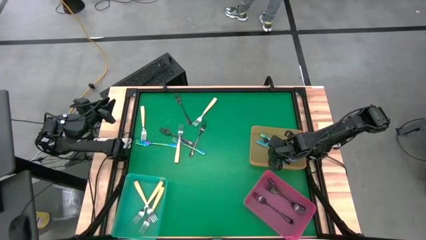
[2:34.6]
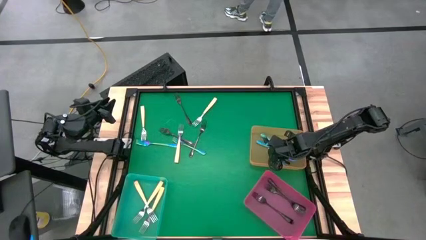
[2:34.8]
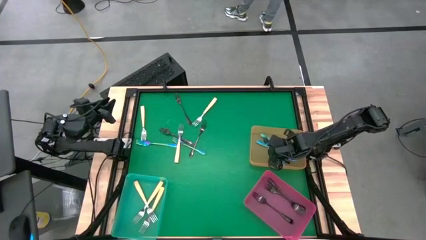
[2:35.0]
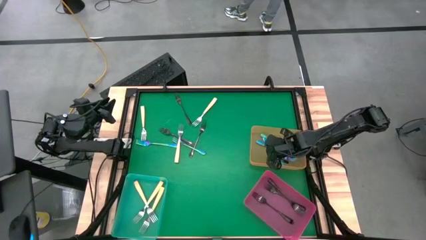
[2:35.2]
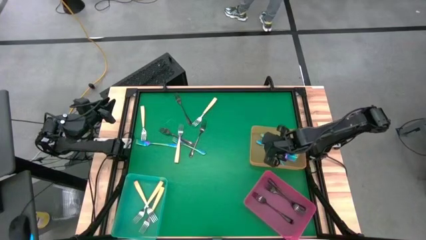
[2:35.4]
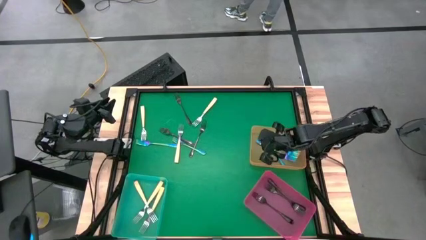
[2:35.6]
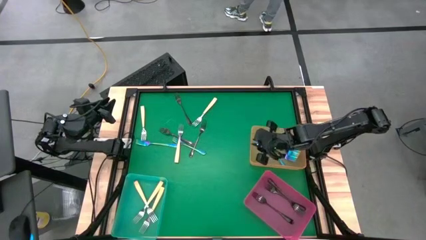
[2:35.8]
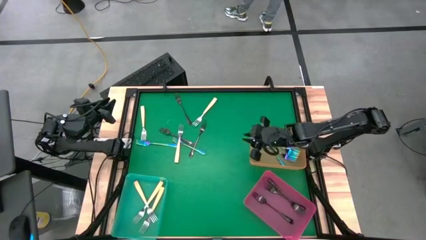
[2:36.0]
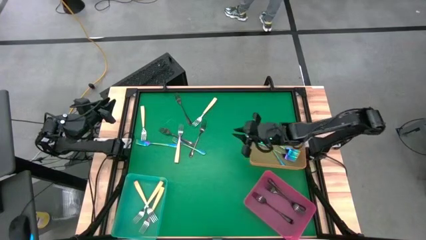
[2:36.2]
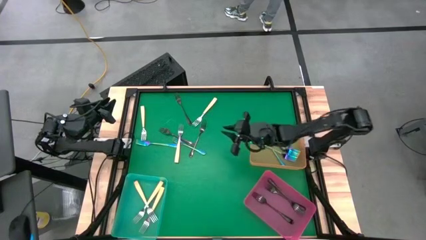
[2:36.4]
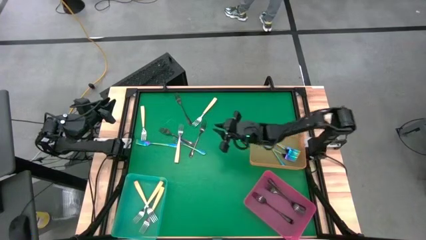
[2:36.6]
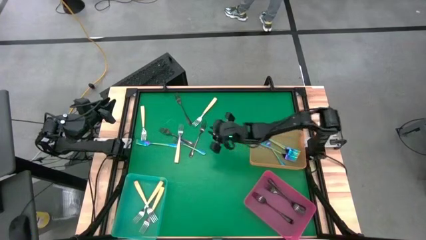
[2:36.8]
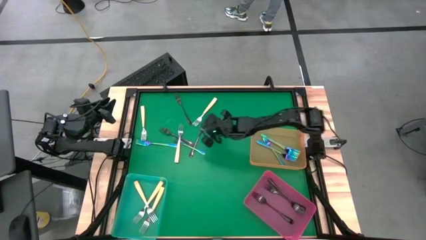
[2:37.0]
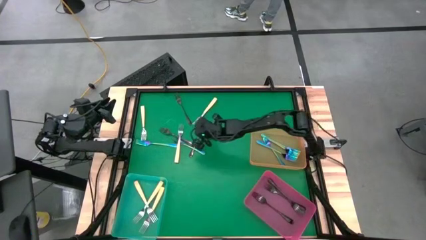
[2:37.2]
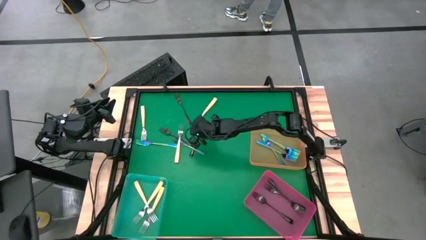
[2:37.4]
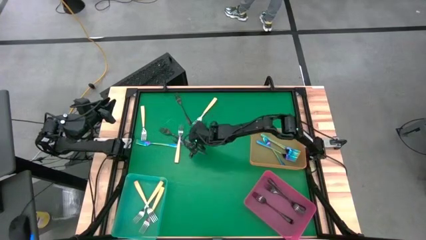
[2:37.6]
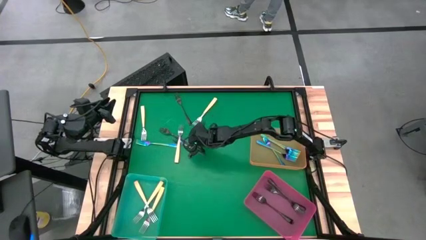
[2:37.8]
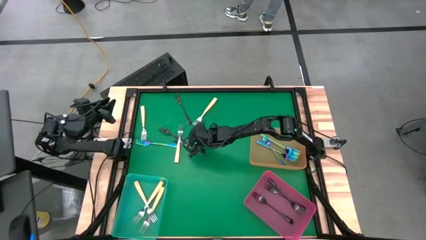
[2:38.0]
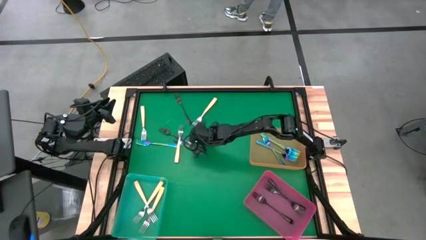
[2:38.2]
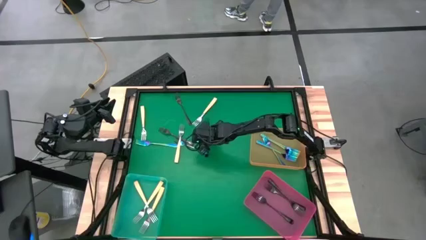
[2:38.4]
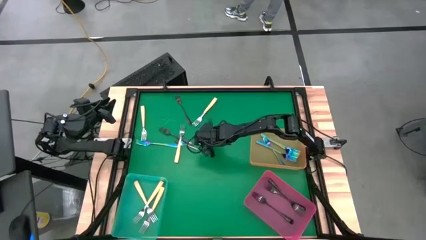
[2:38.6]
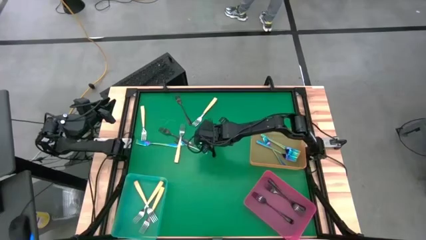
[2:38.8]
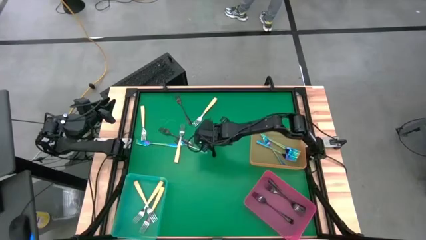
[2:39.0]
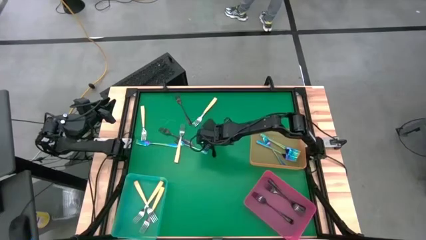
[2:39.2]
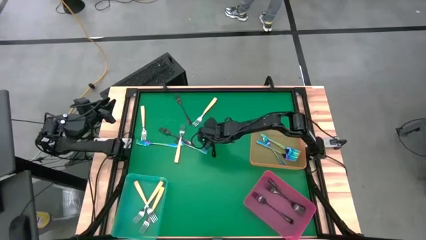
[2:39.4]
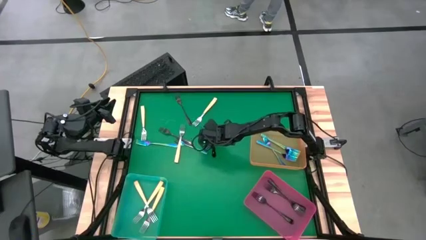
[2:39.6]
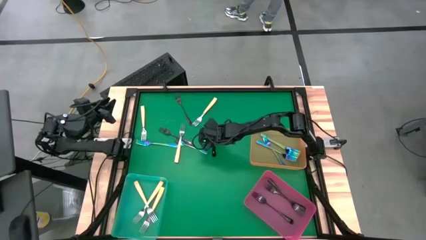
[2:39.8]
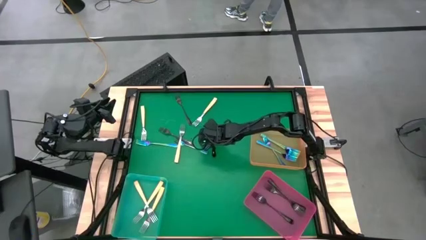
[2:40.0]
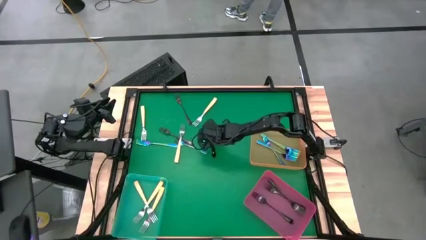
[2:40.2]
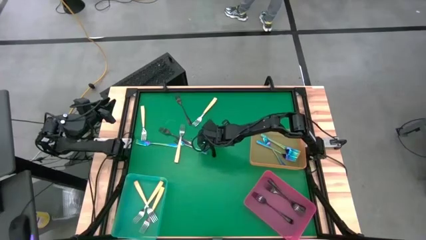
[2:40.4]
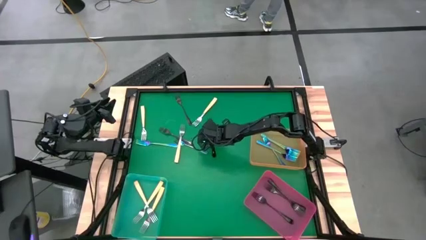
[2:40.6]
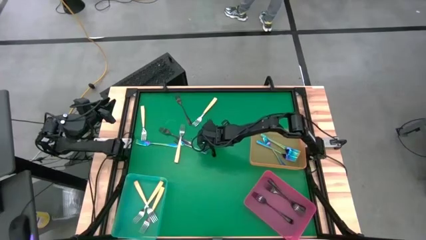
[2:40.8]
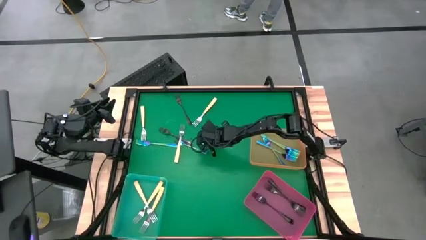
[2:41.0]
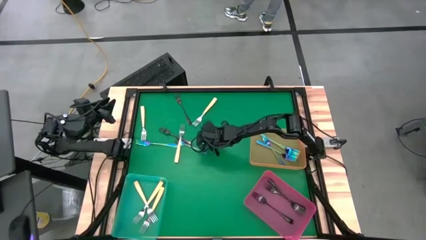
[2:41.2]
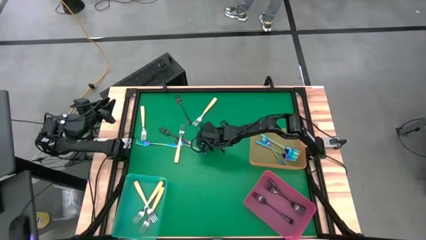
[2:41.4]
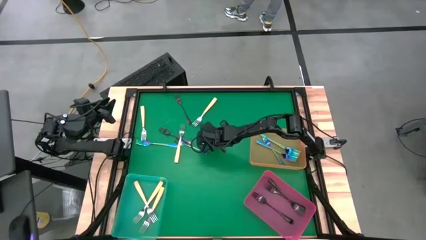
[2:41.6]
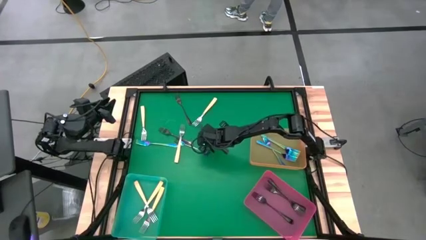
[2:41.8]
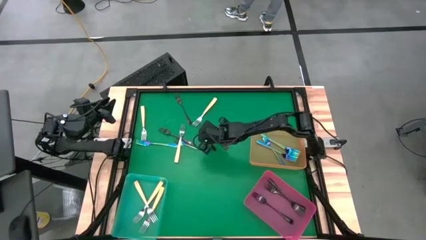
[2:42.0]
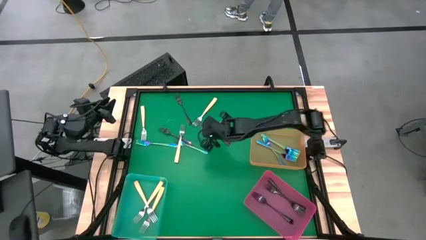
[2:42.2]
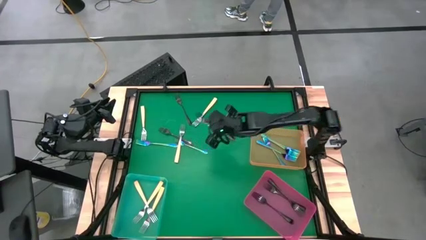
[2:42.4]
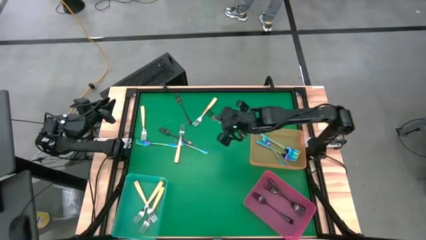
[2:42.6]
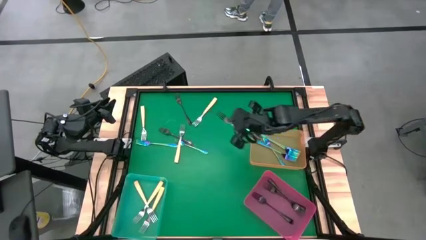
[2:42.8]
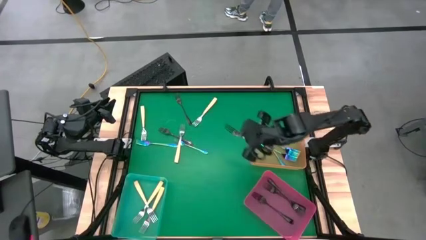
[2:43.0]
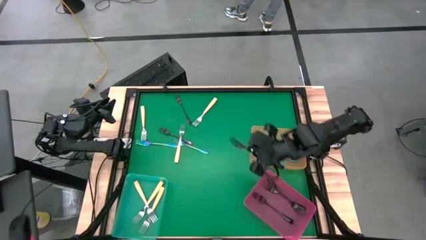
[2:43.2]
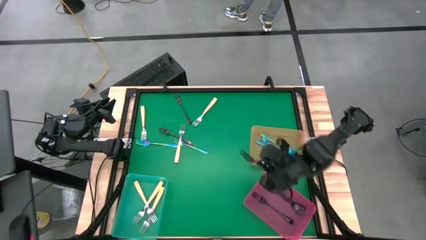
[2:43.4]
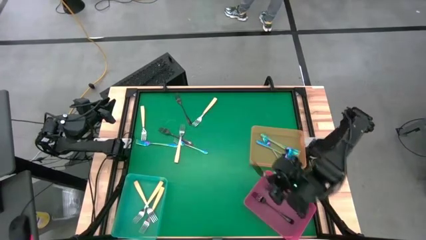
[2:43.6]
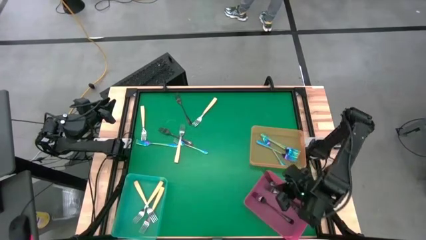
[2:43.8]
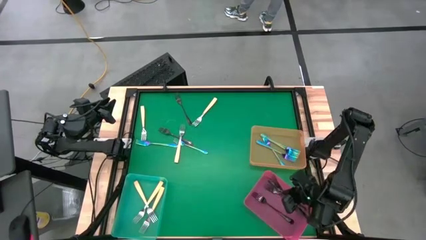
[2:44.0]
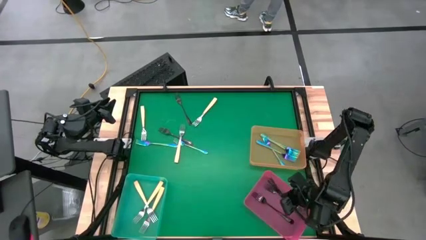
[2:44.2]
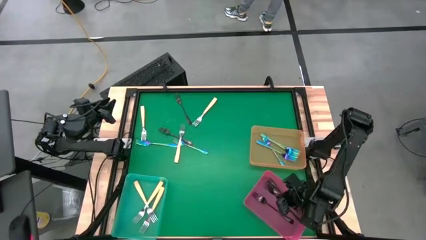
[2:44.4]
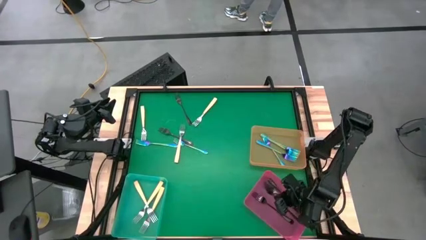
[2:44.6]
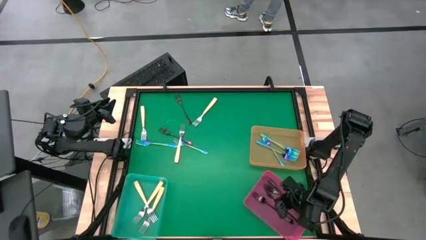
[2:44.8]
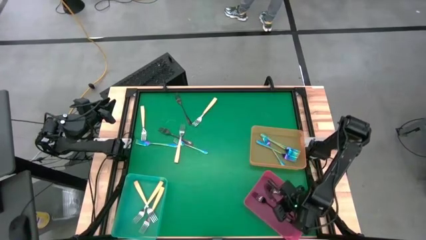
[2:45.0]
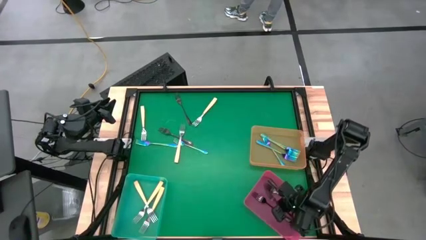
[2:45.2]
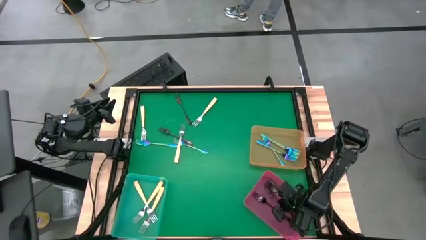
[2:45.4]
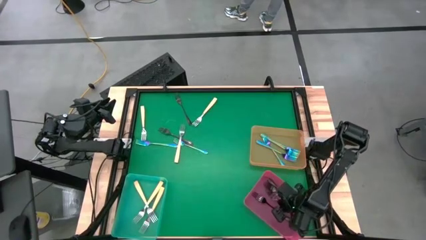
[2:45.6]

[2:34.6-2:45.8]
Task: Sort silverware by color (type)
Put the black fork into the pink bin

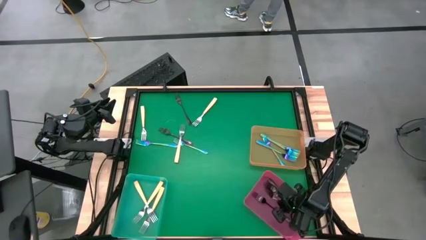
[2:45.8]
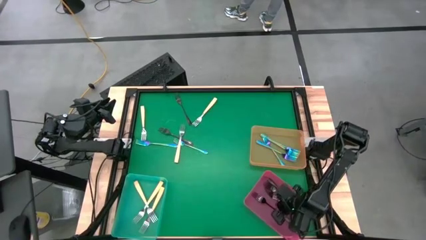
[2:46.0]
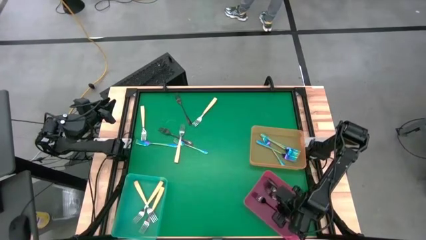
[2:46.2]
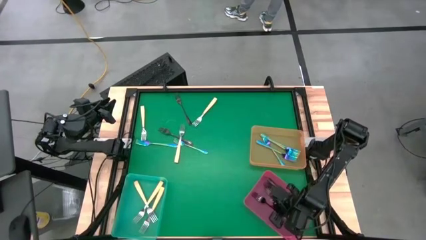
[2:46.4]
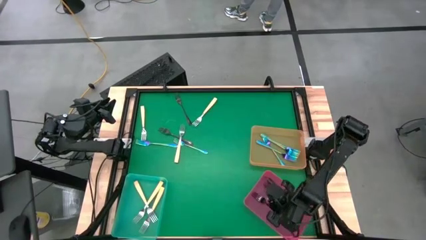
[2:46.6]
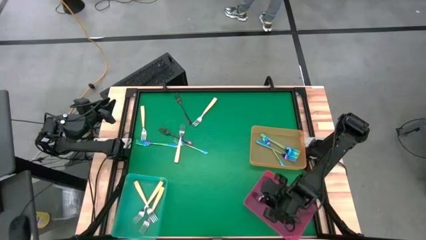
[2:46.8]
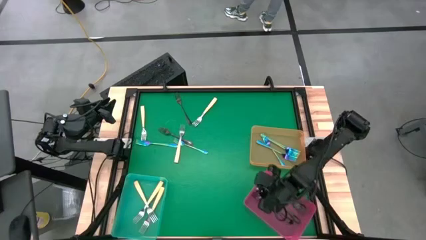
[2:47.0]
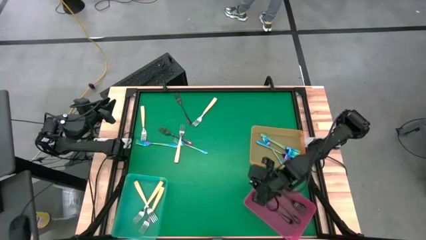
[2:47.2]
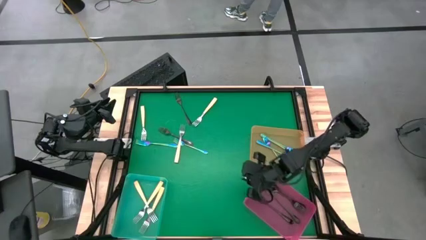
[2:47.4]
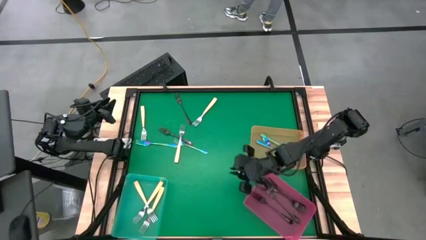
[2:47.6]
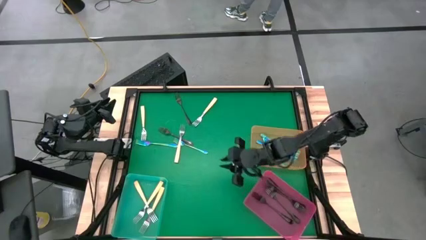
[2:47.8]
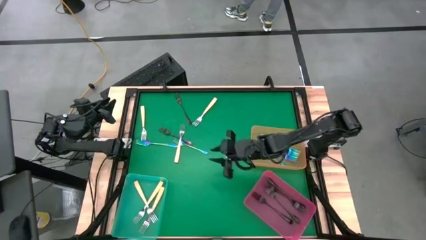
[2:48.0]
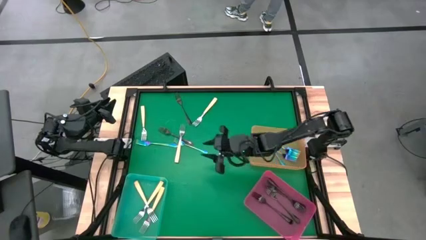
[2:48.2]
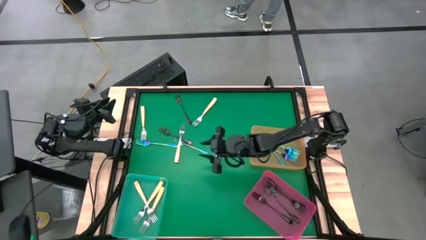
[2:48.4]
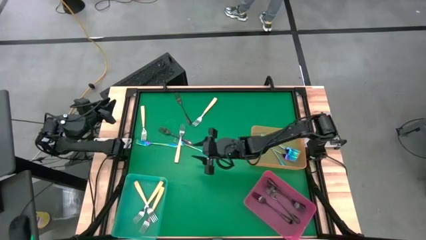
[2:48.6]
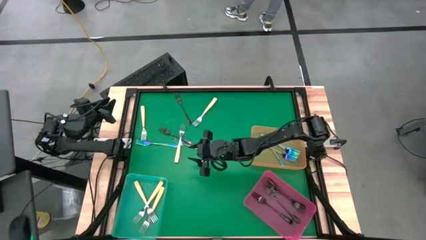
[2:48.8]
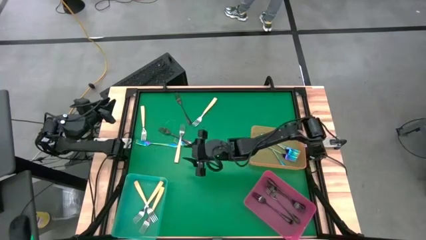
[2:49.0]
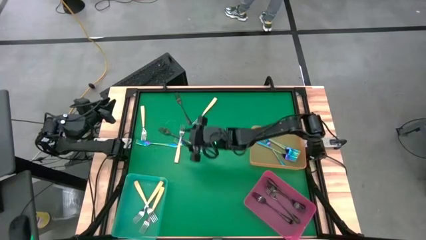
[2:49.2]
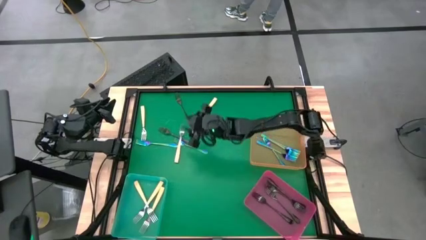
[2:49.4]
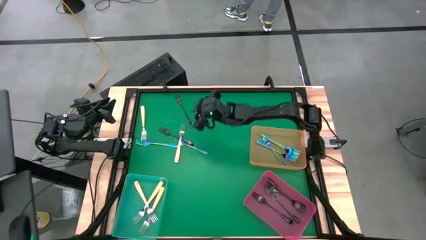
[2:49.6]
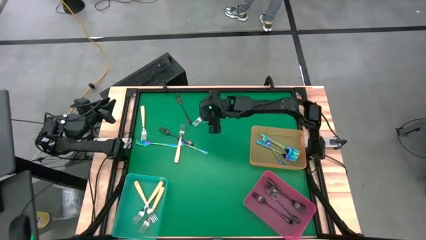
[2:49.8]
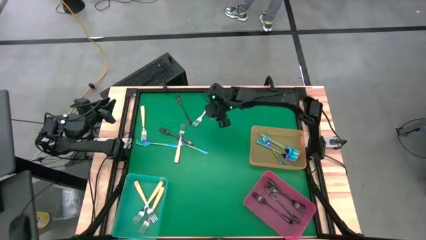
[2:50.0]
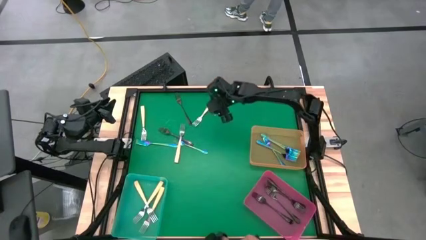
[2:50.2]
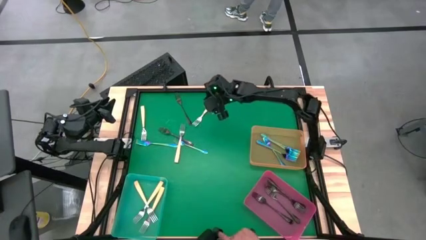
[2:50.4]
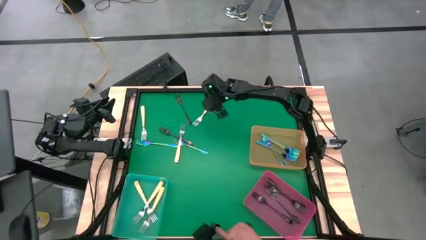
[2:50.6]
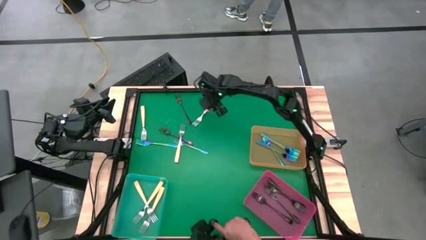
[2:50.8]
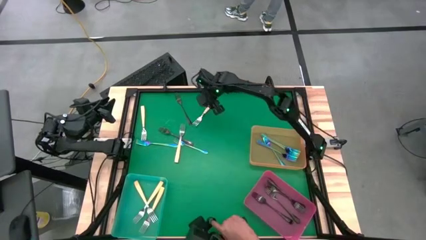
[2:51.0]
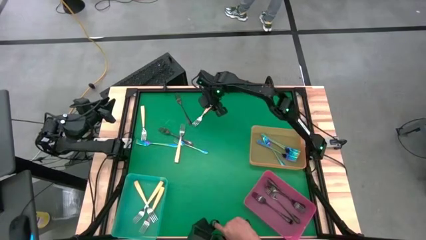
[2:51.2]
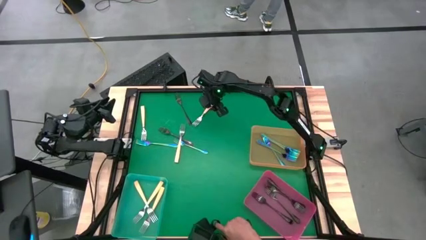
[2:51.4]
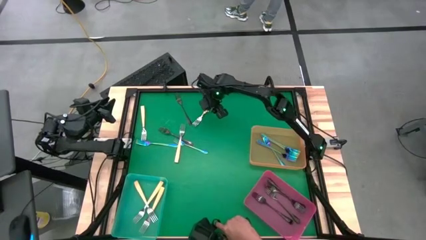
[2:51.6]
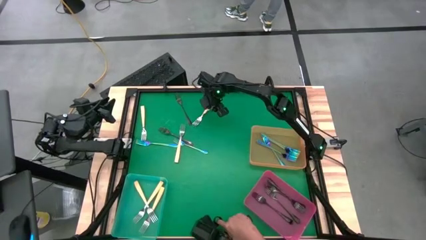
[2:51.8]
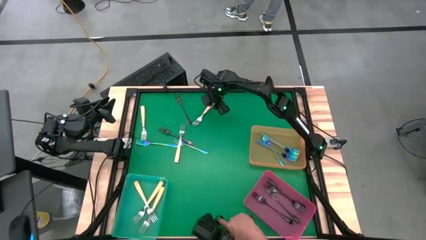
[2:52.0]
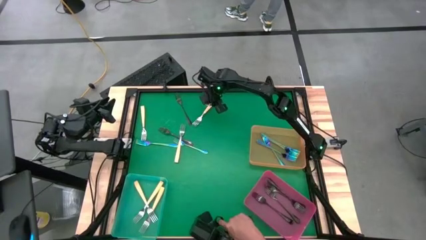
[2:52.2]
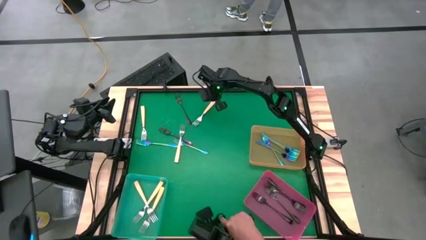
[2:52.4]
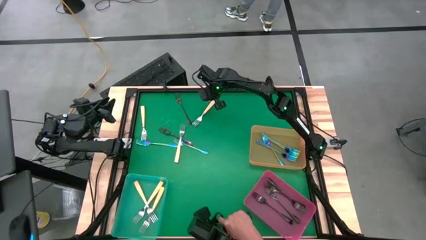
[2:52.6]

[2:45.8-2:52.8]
Put the yellow fork into the blue bin
